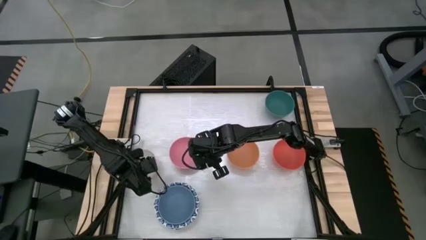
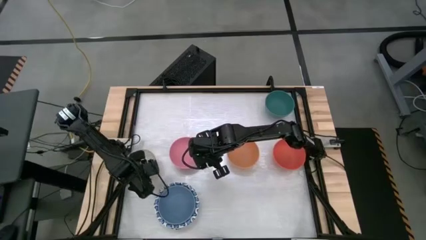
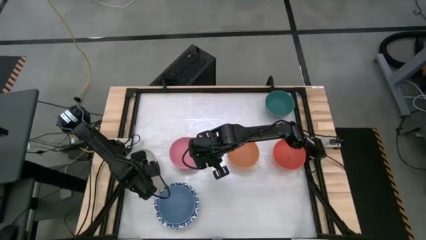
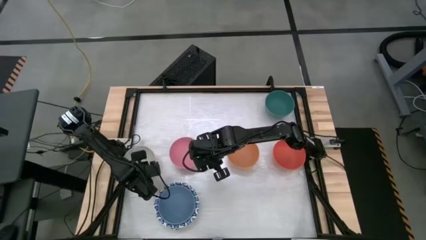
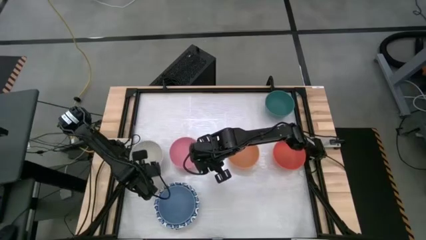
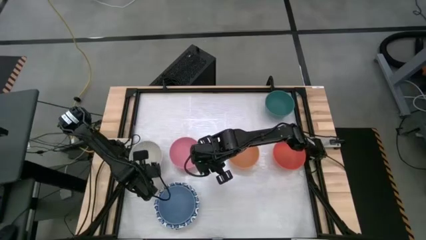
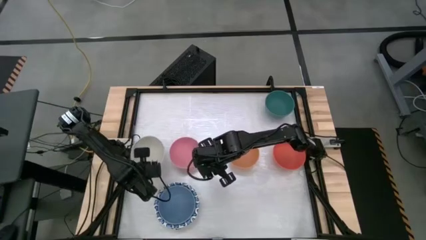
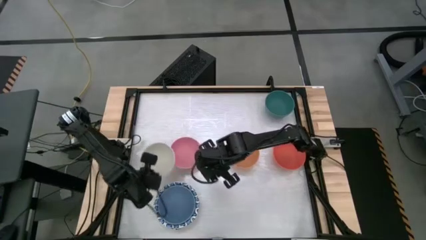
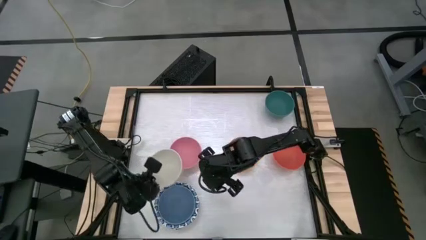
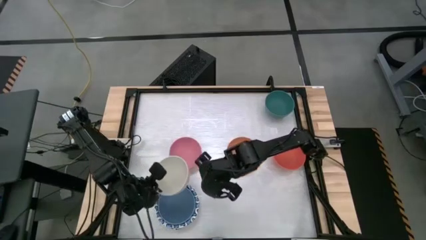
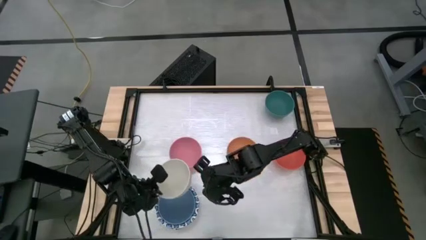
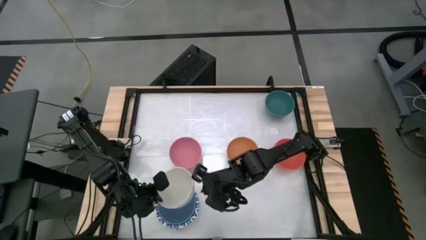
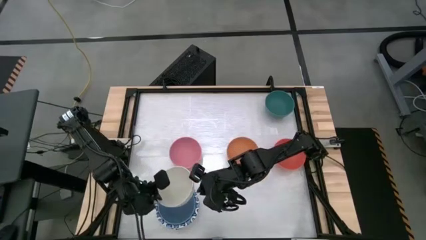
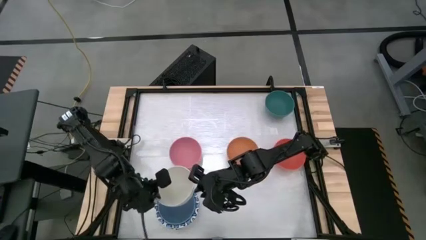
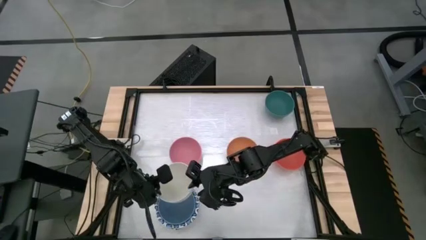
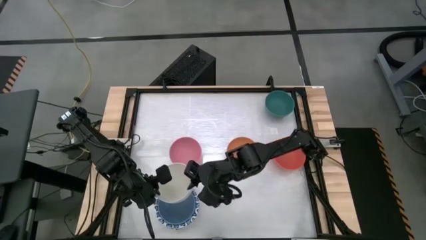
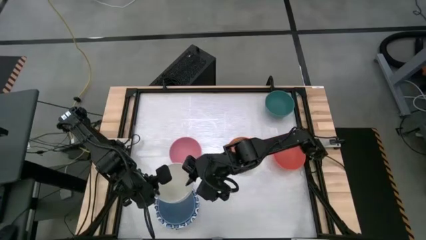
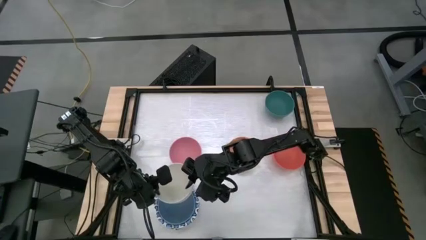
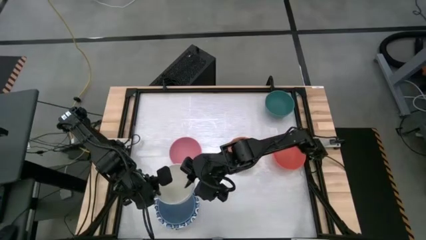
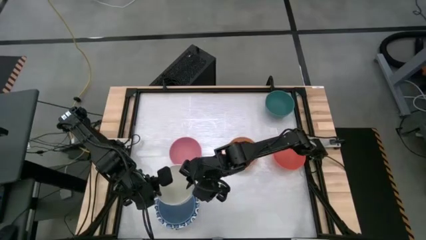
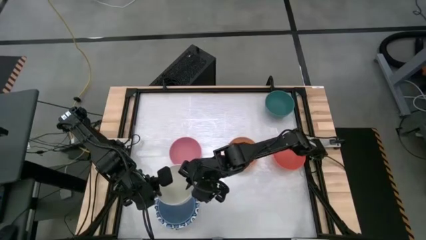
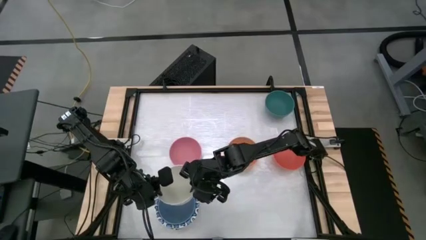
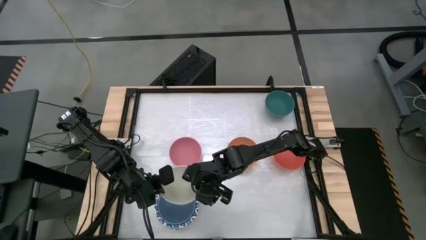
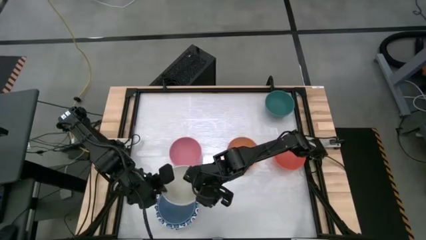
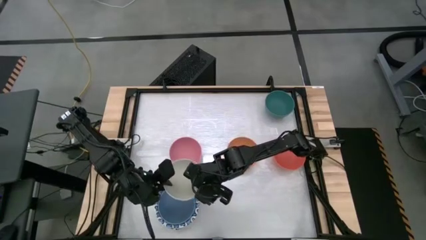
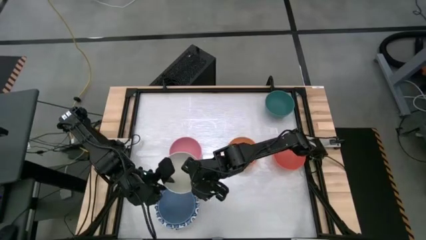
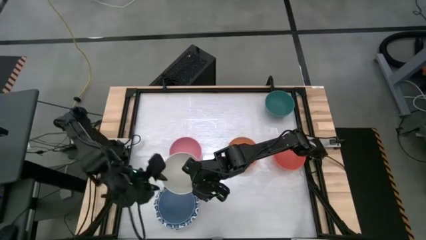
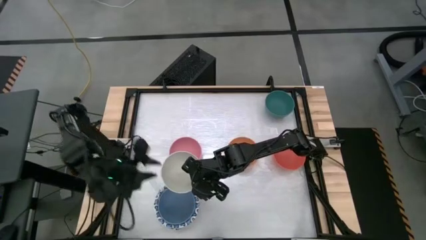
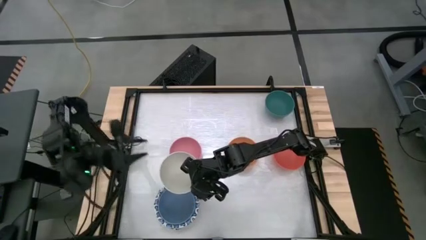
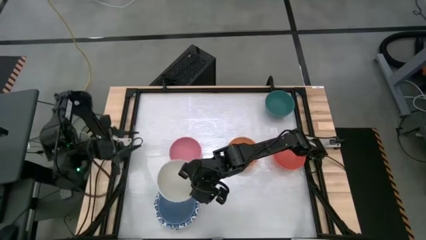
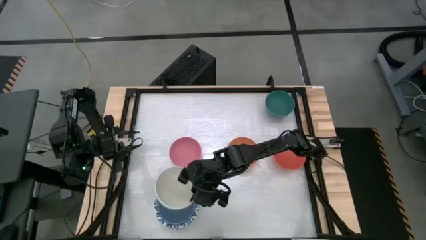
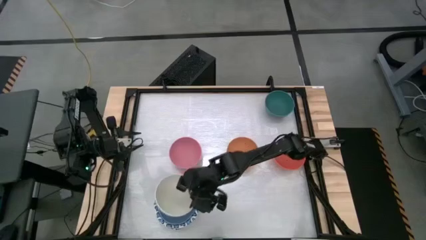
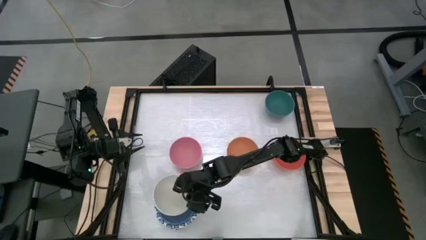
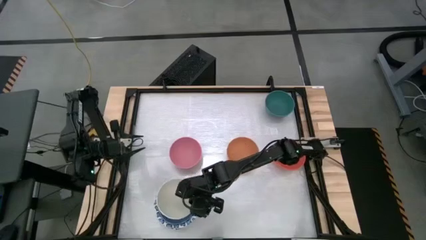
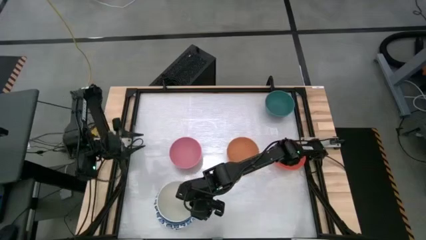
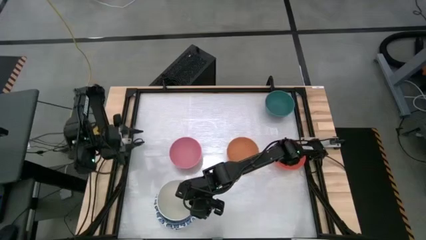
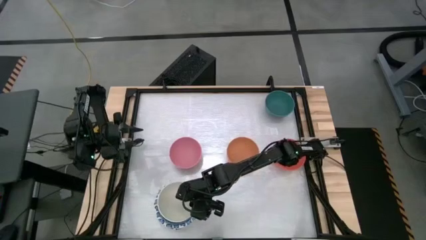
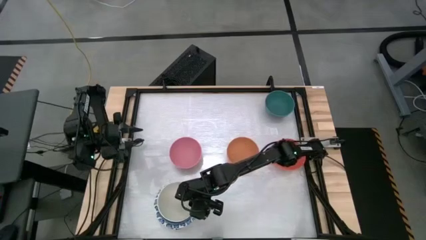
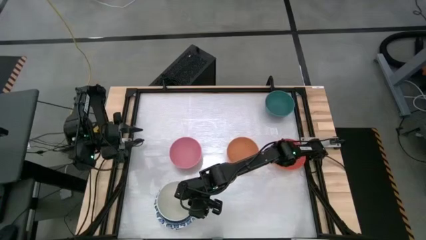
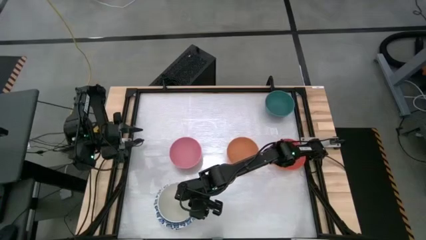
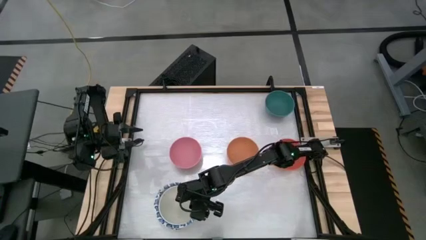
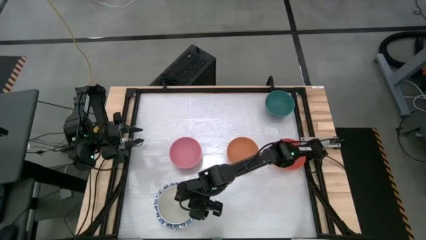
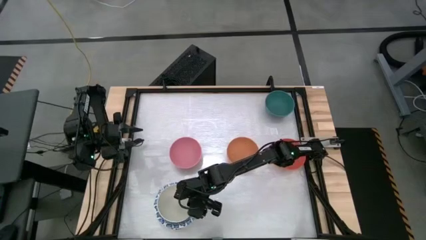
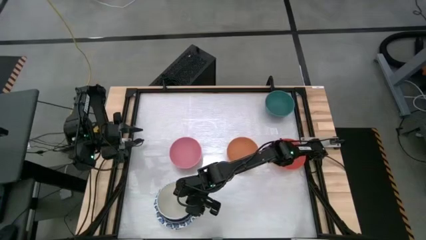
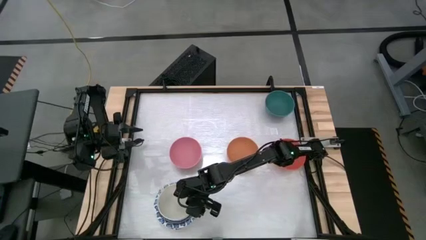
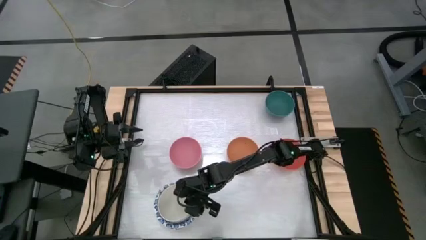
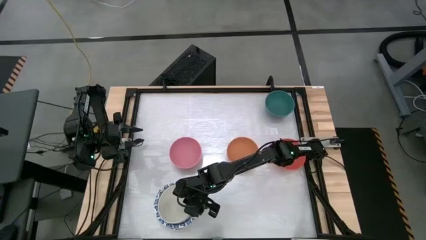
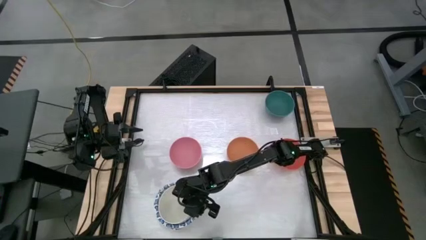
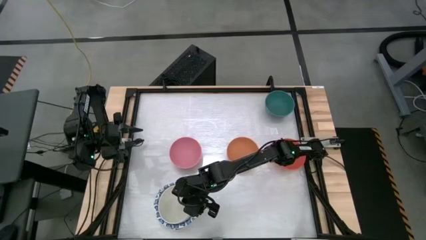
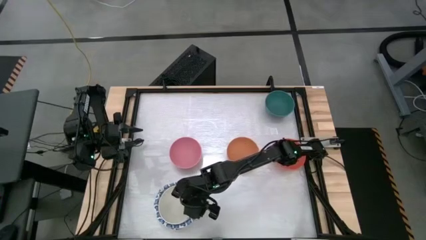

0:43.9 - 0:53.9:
Stack the white bowl on top of the other blue bowl

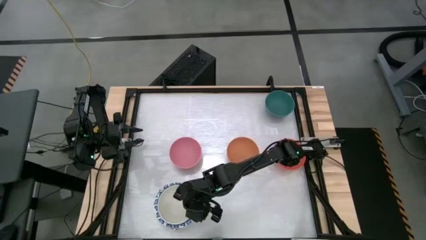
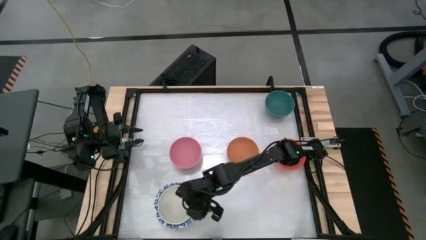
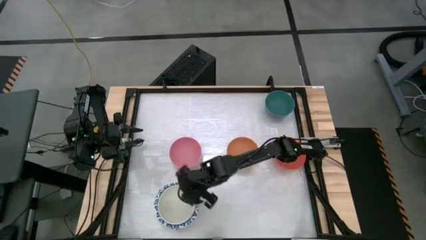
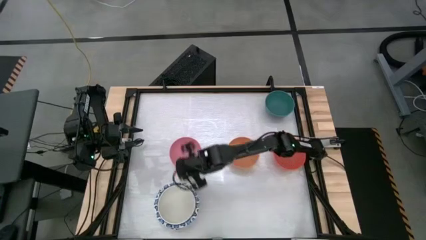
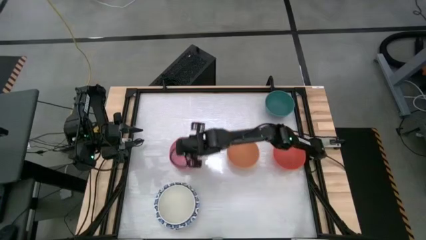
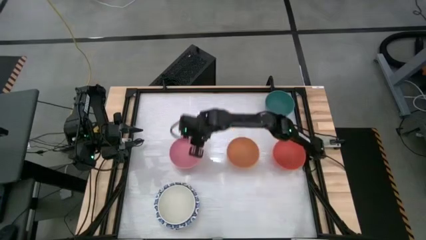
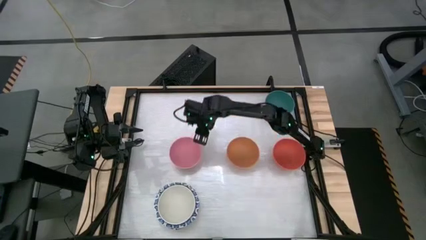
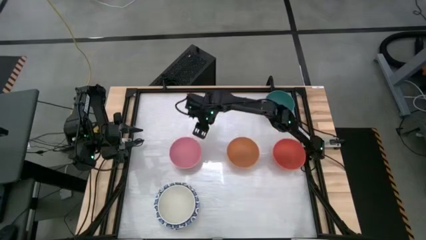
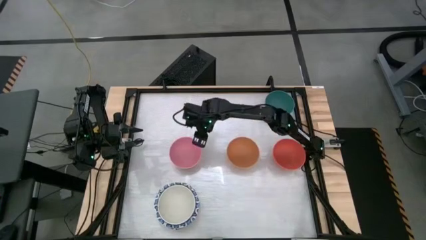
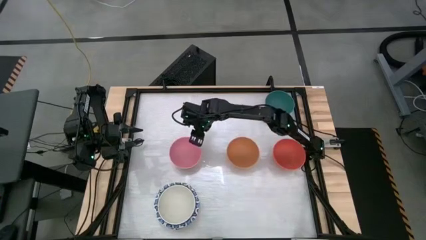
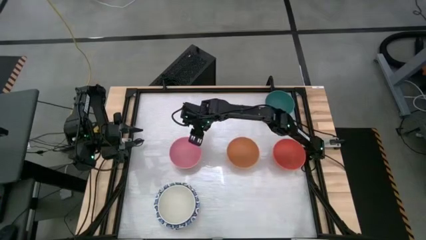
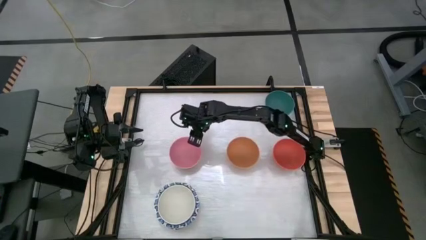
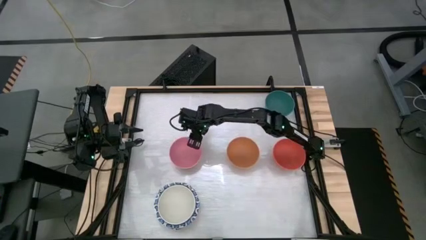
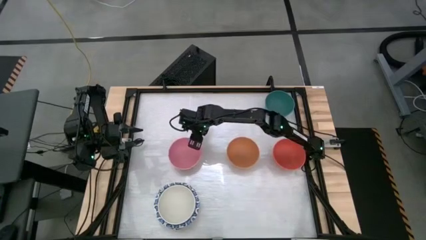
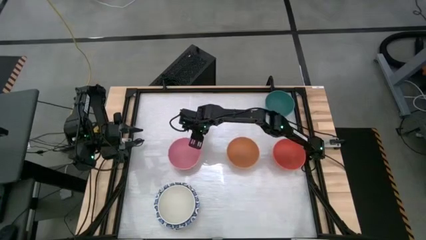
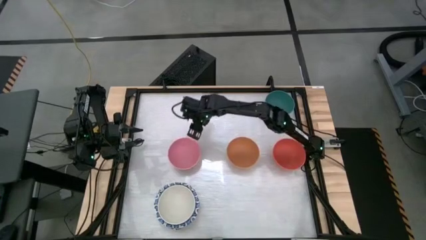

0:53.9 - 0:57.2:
Stack the pink bowl on top of the other white bowl
